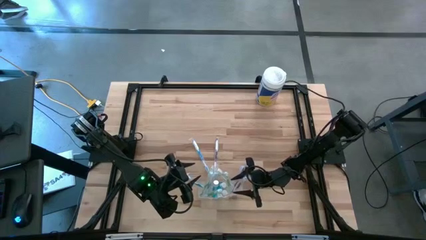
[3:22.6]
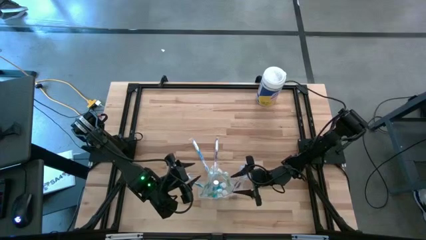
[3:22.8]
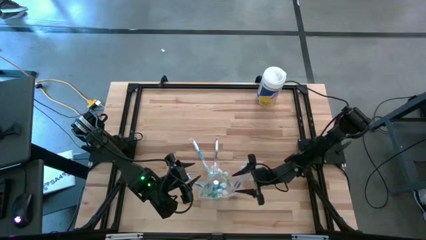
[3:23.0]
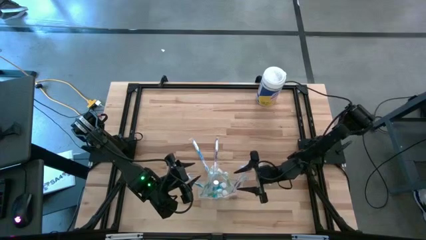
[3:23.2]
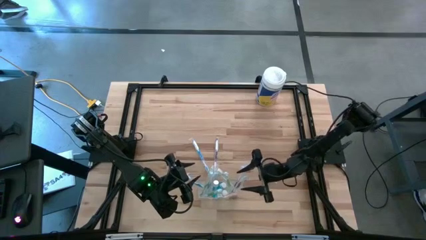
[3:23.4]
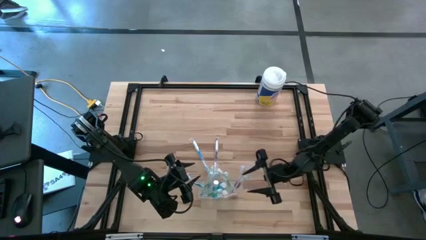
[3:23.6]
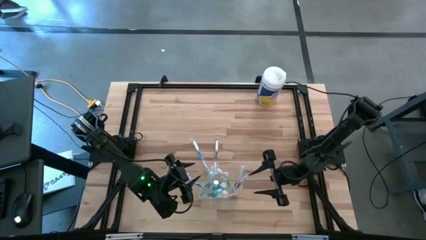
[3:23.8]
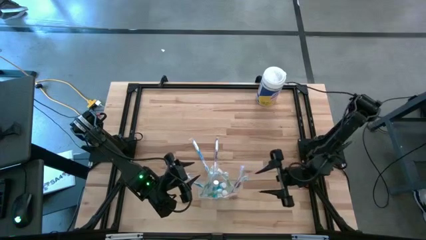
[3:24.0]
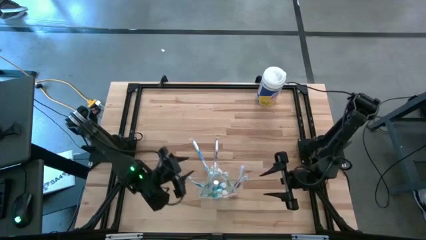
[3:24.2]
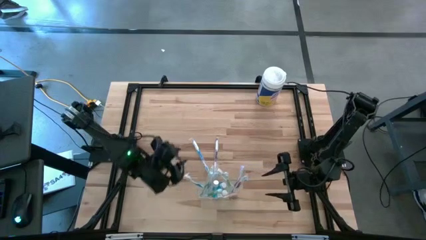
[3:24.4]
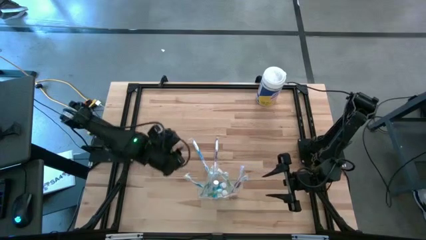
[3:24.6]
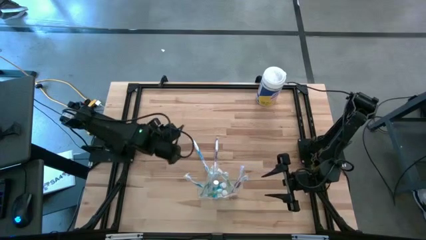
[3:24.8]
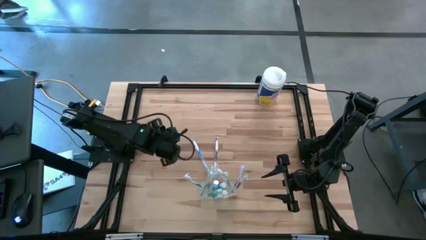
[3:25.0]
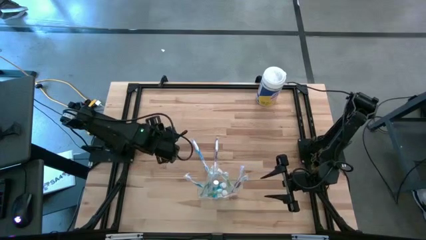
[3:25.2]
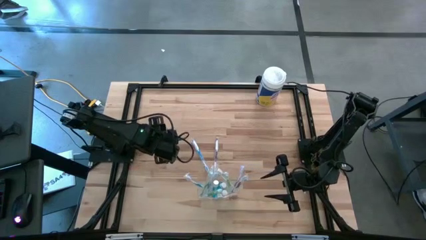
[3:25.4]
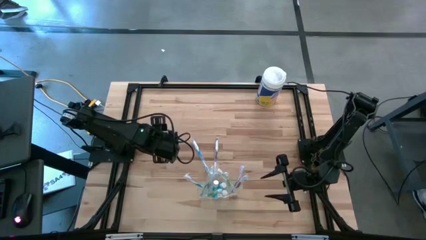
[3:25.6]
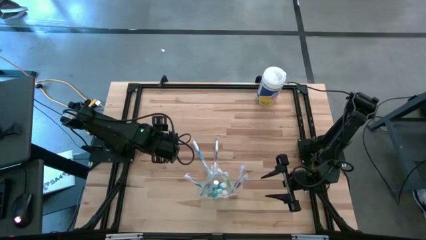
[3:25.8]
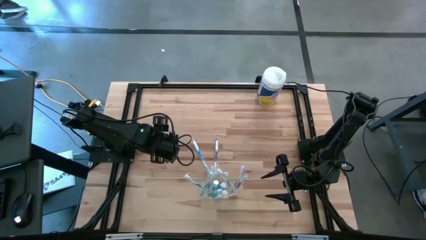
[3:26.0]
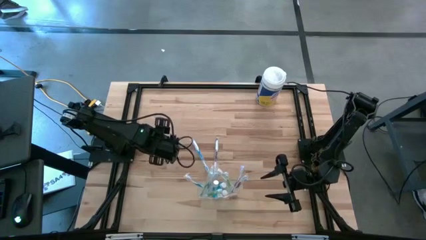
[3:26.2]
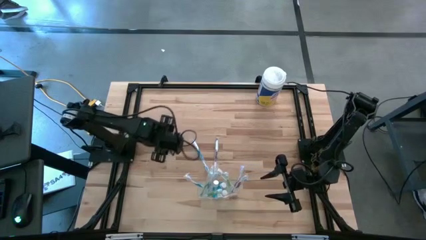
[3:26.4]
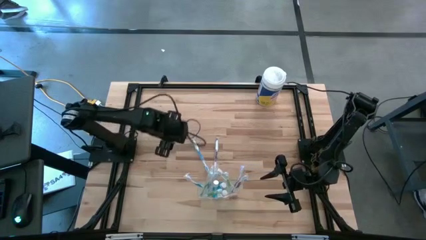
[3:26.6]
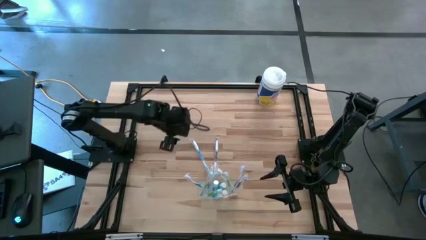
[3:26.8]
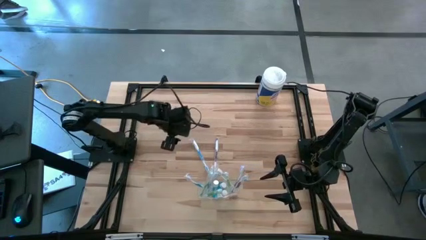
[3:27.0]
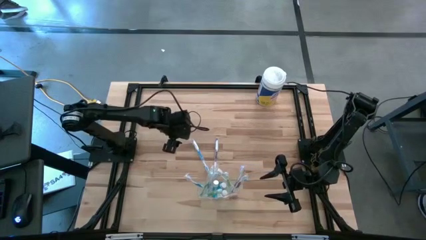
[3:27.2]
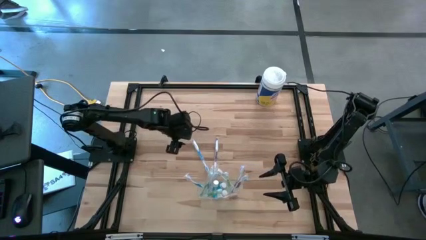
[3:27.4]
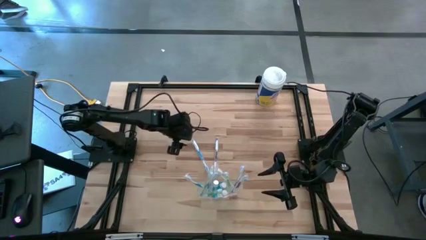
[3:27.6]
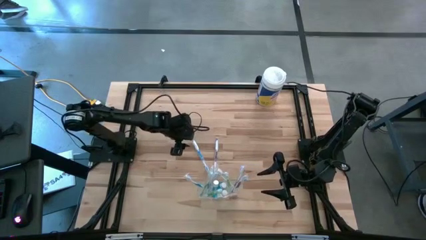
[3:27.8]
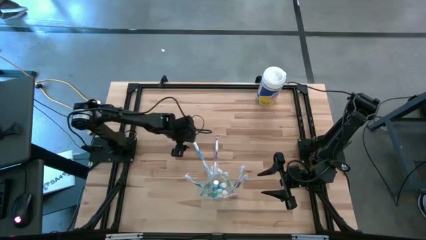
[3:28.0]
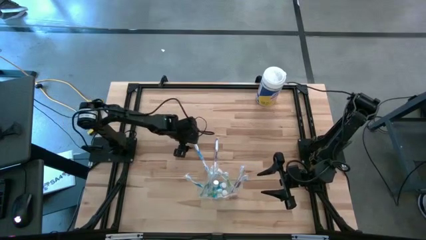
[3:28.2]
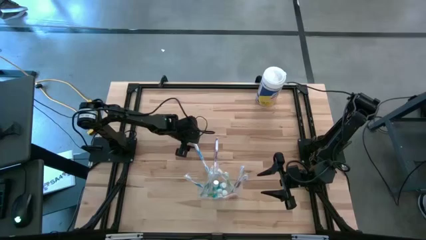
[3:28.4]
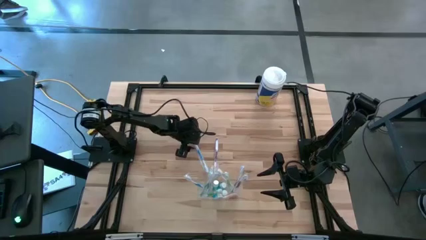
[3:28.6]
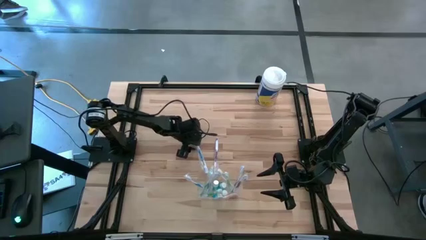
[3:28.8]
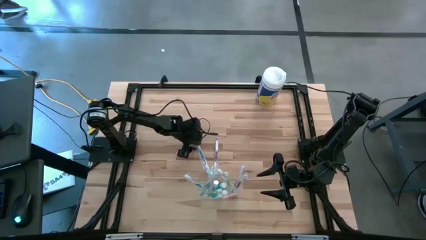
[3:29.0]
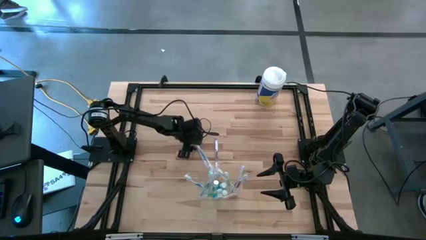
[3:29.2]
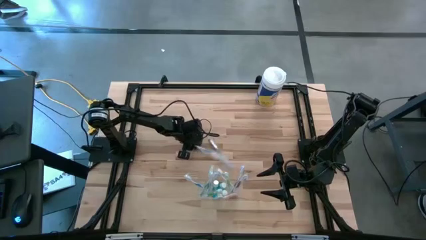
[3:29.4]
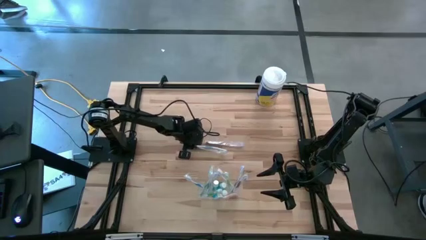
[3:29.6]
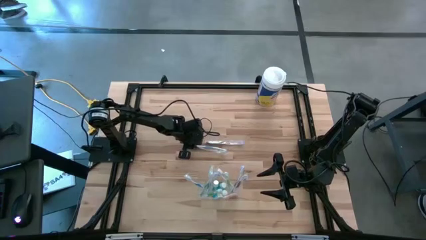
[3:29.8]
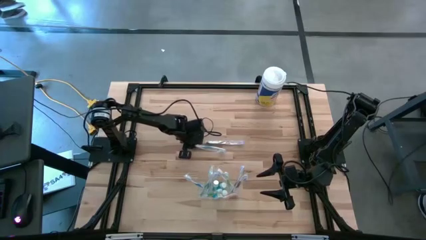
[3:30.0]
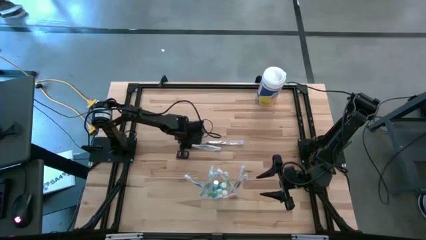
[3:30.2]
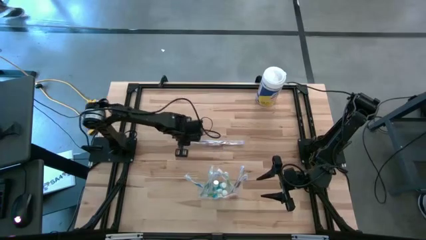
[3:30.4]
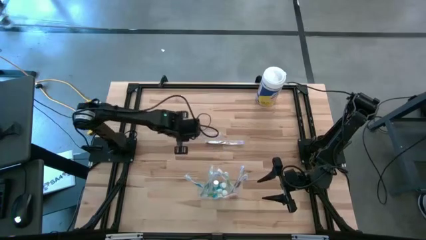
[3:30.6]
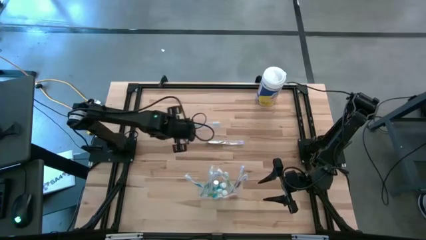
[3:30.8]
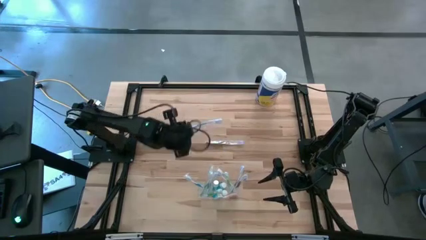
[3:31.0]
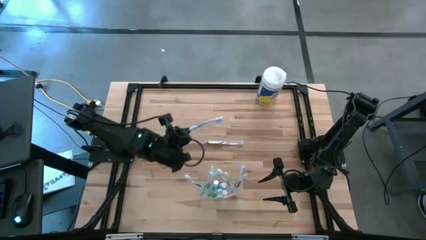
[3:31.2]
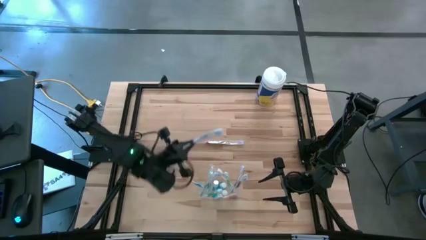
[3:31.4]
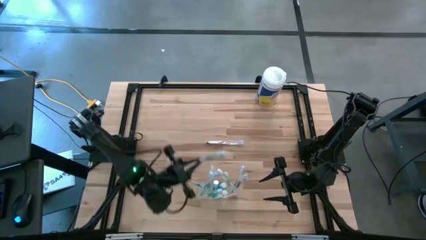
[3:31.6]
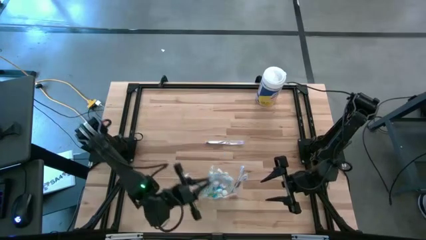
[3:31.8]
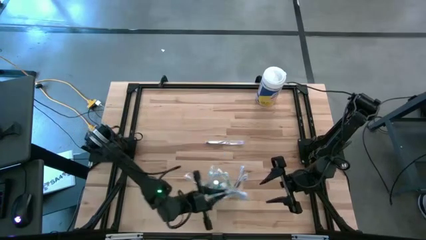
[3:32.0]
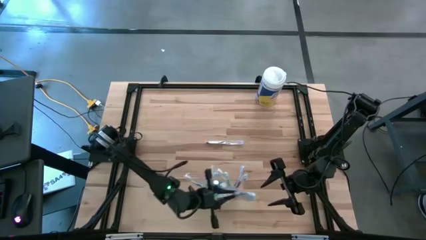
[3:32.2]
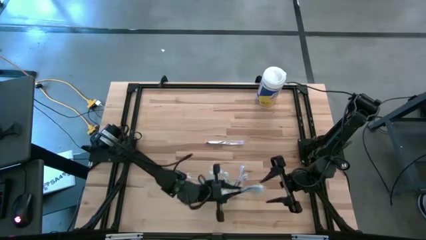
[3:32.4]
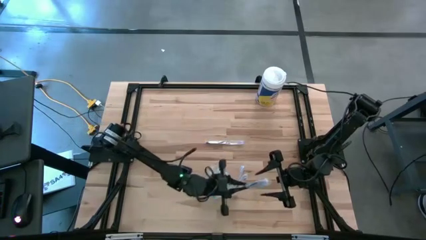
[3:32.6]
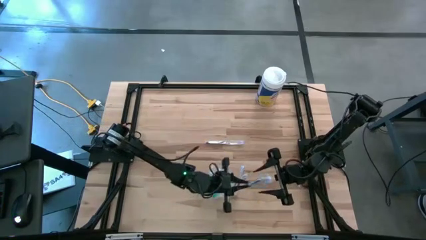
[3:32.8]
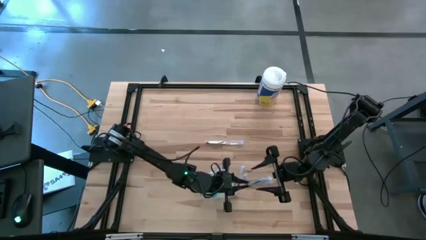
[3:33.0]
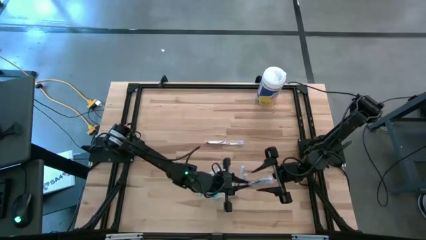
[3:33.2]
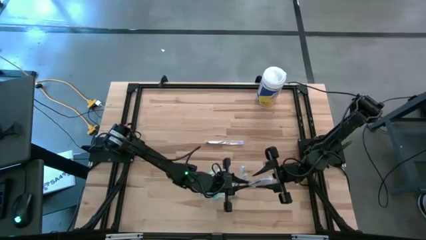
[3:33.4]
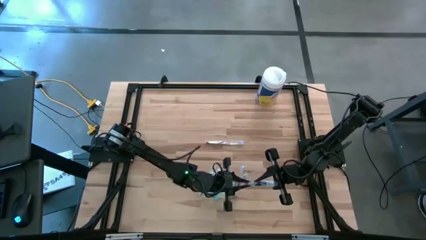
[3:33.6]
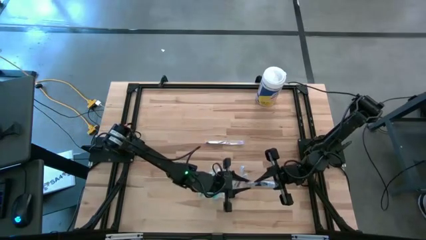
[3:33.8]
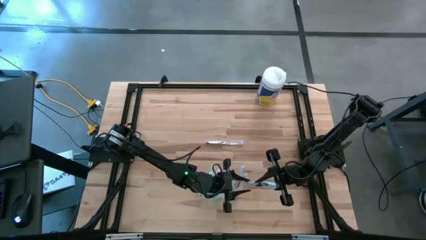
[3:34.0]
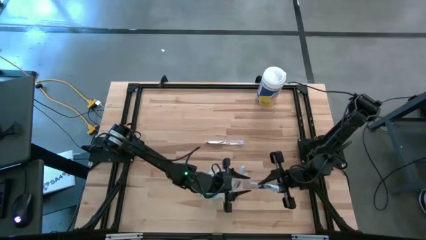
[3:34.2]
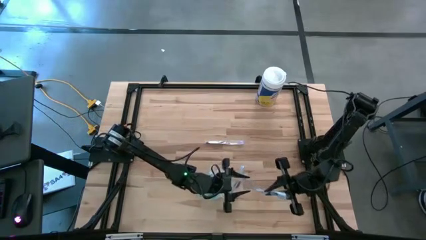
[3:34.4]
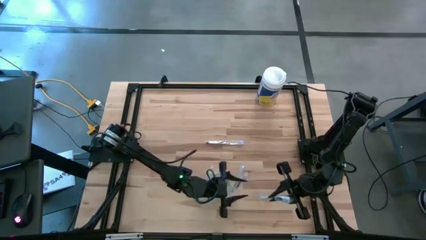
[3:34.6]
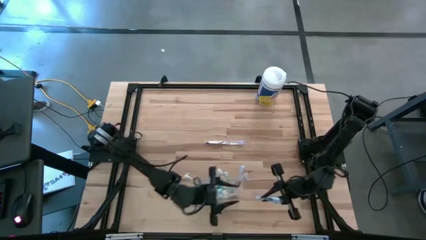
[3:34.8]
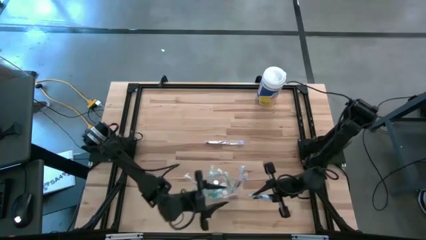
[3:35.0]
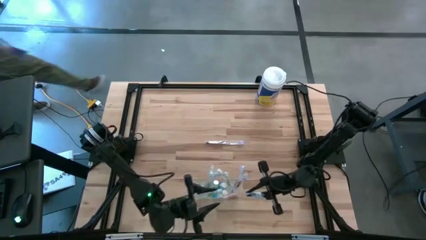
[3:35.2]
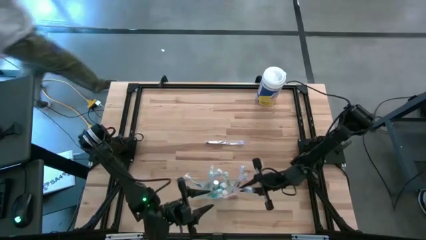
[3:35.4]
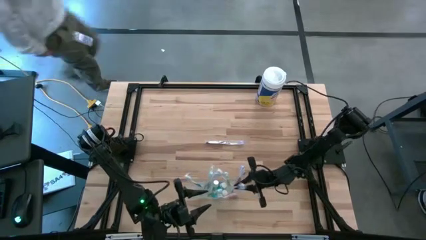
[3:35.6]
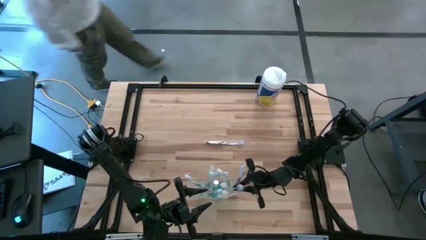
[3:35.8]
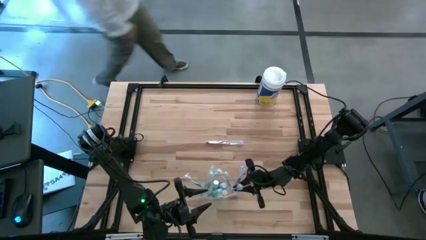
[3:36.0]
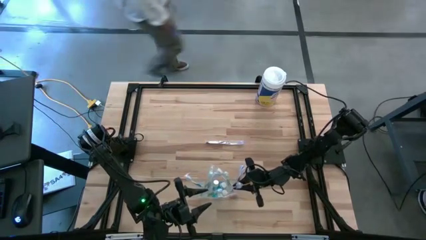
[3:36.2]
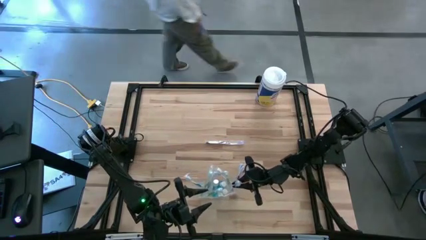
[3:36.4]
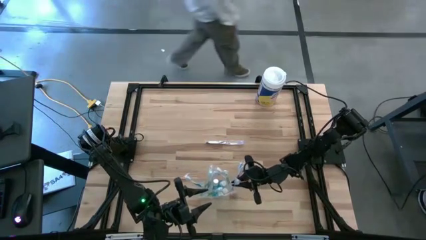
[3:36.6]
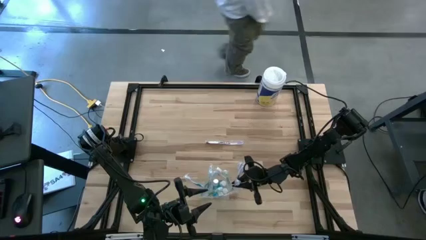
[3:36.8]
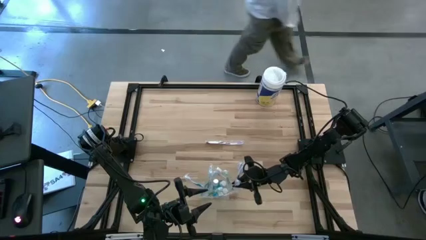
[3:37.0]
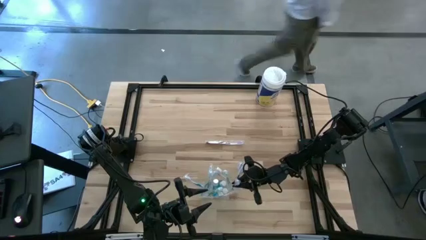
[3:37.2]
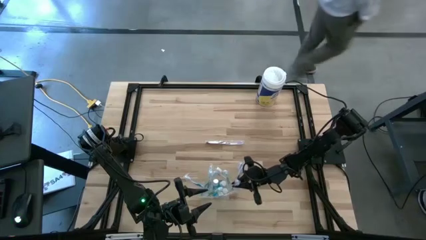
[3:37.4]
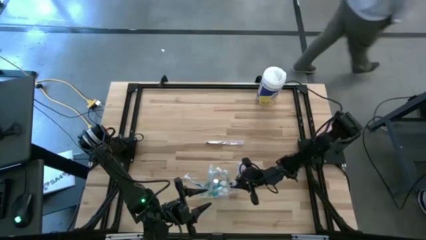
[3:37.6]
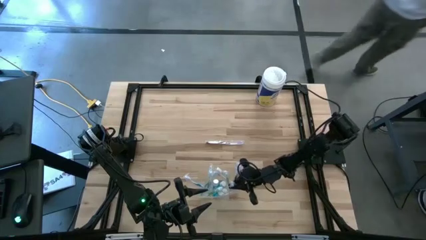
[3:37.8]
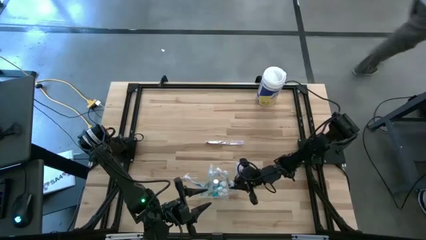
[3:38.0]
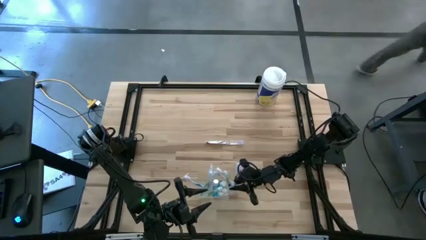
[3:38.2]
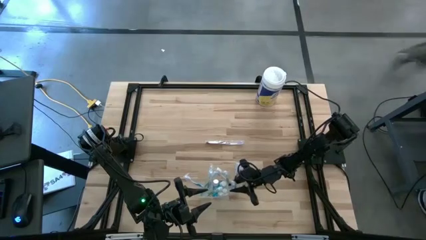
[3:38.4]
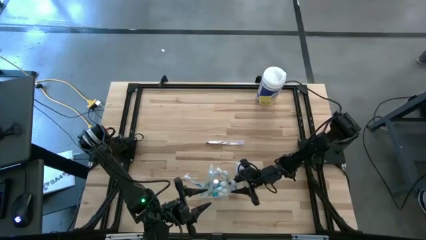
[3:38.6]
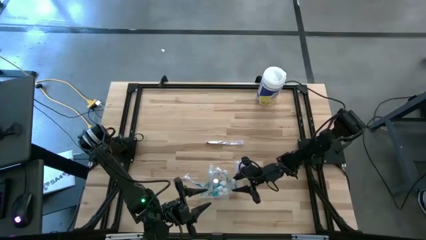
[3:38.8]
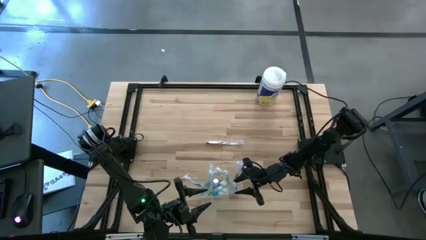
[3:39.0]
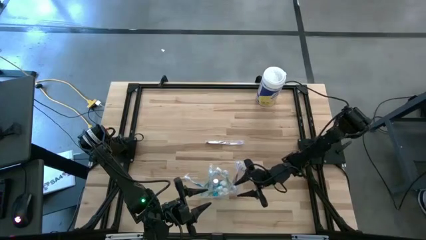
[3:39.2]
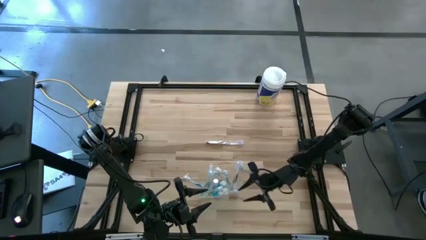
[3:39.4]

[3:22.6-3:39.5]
Task: Pick & Place toothbrushing station
Put the blue toothbrush into the transparent organizer
